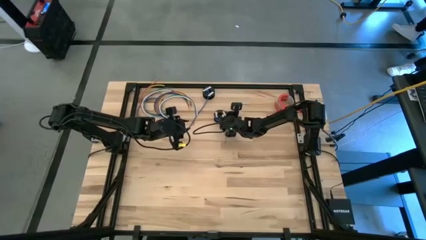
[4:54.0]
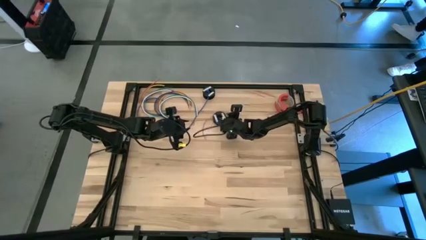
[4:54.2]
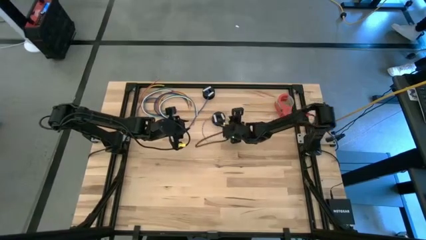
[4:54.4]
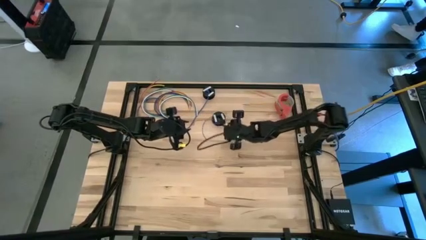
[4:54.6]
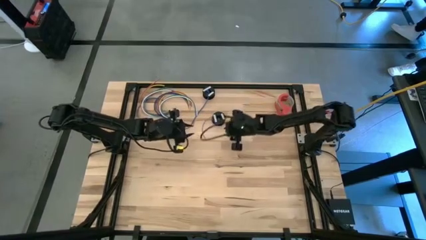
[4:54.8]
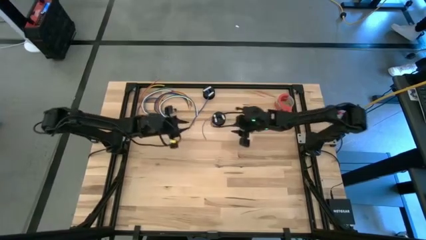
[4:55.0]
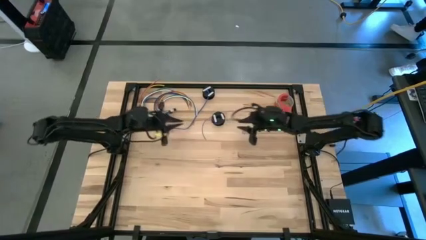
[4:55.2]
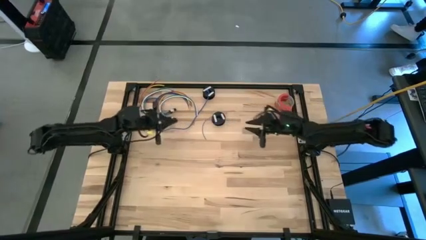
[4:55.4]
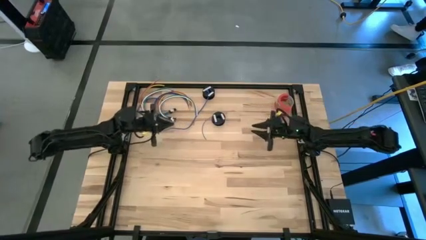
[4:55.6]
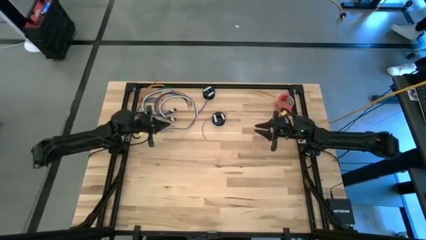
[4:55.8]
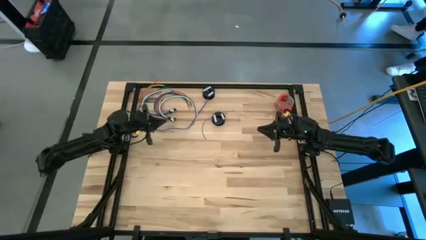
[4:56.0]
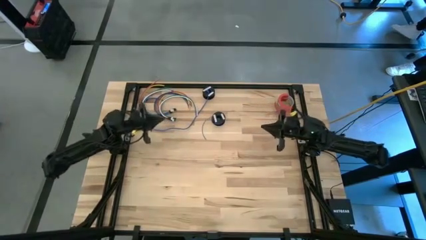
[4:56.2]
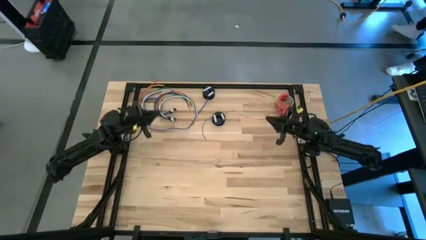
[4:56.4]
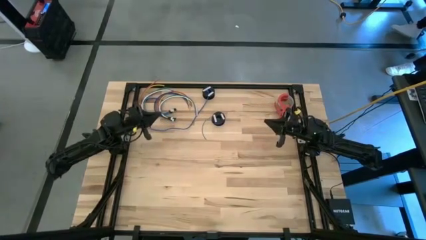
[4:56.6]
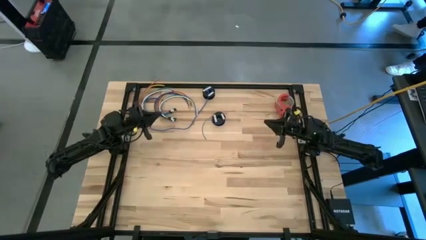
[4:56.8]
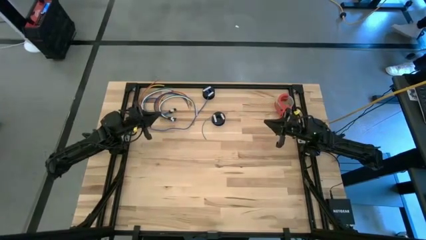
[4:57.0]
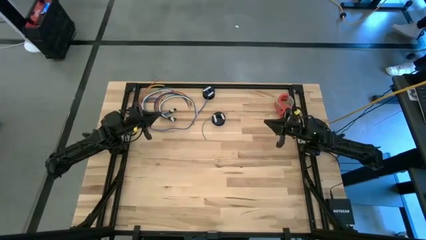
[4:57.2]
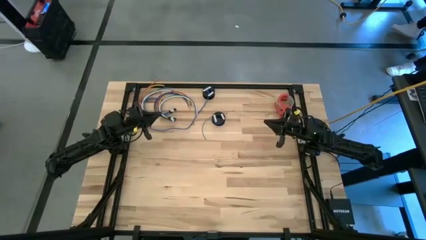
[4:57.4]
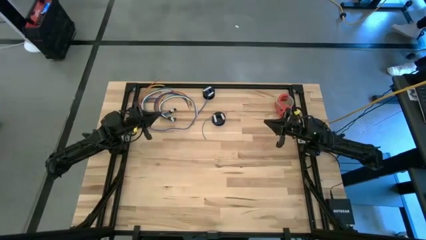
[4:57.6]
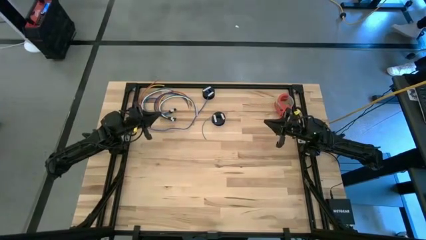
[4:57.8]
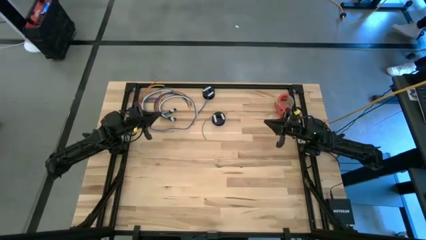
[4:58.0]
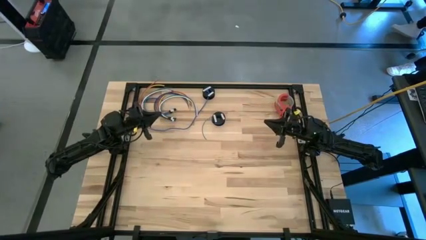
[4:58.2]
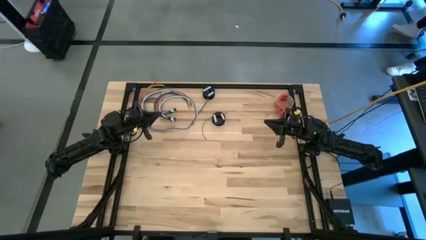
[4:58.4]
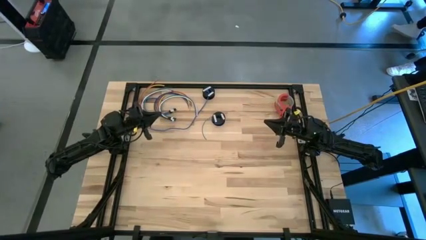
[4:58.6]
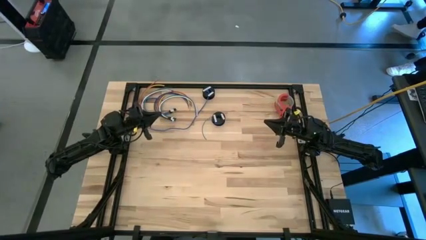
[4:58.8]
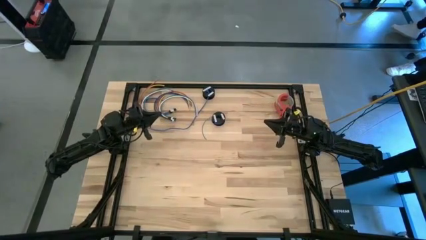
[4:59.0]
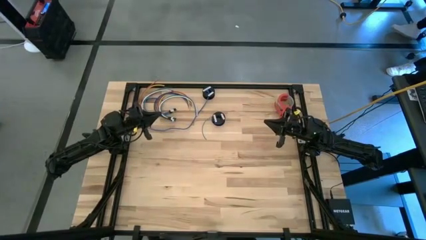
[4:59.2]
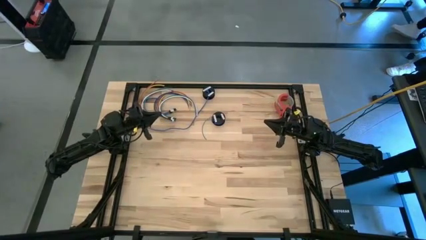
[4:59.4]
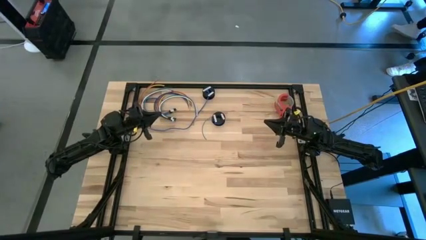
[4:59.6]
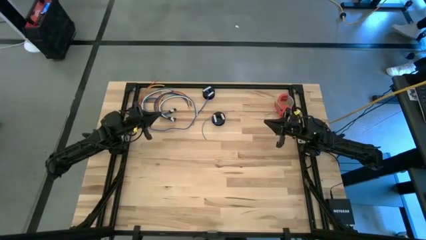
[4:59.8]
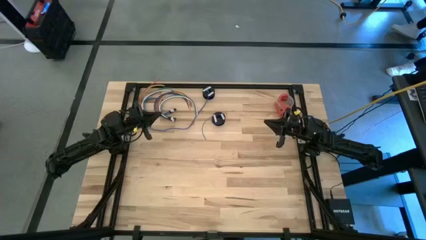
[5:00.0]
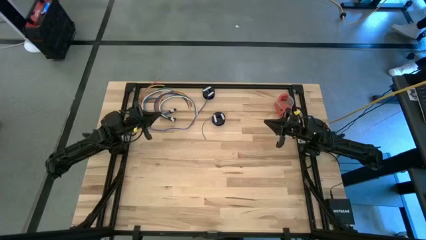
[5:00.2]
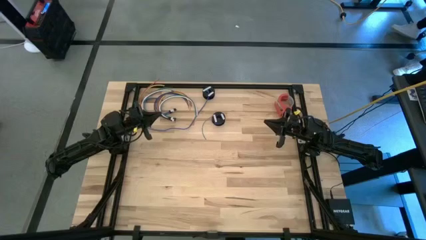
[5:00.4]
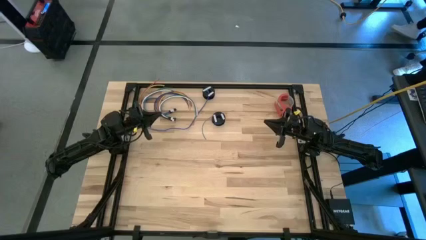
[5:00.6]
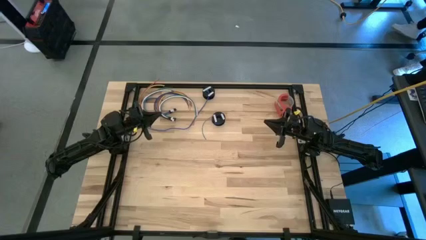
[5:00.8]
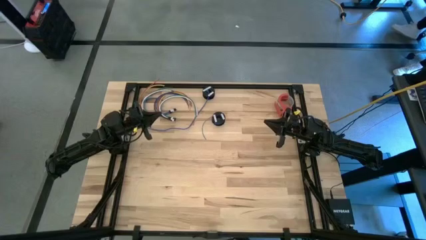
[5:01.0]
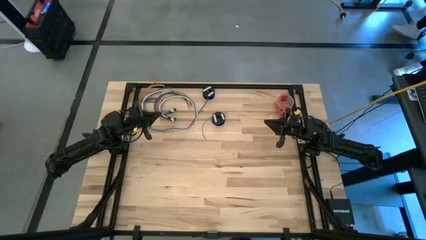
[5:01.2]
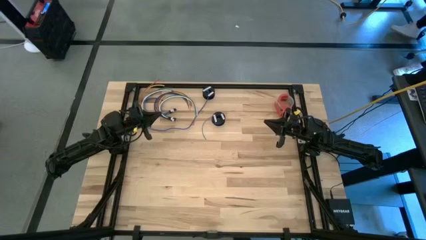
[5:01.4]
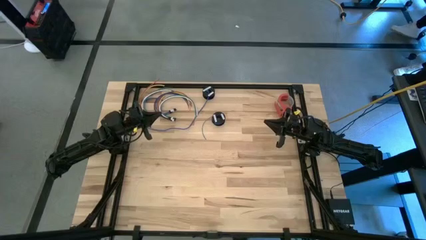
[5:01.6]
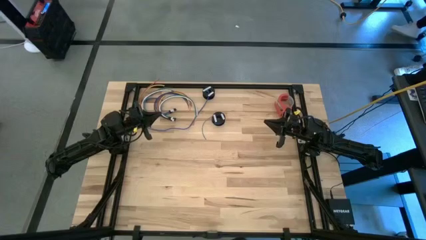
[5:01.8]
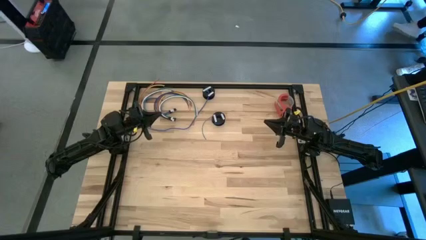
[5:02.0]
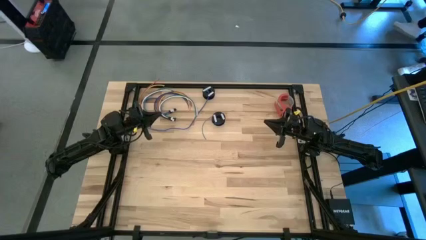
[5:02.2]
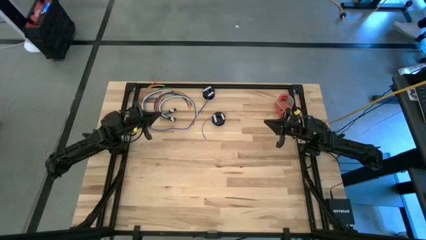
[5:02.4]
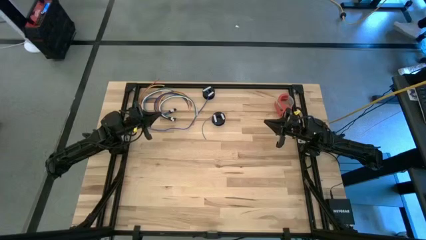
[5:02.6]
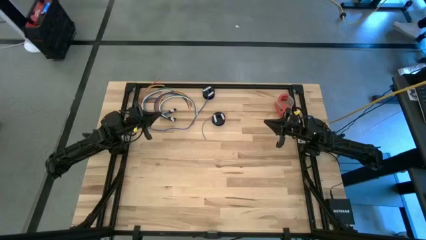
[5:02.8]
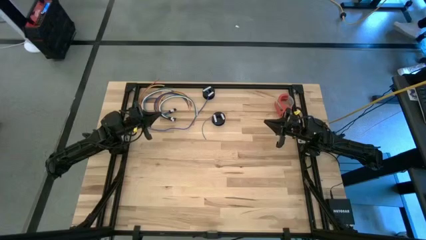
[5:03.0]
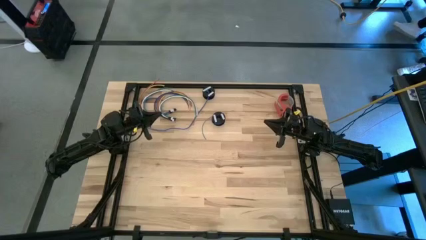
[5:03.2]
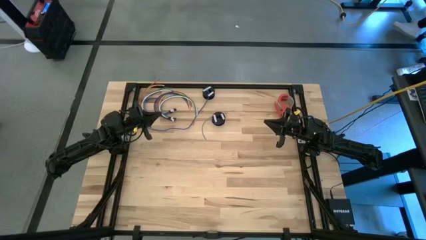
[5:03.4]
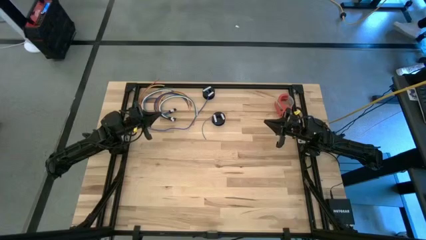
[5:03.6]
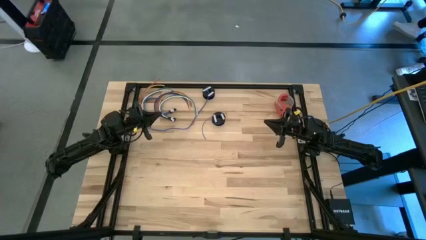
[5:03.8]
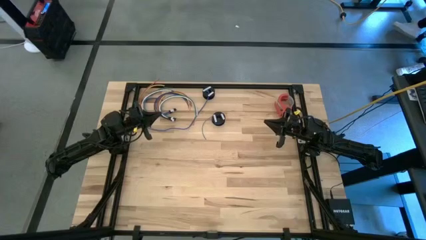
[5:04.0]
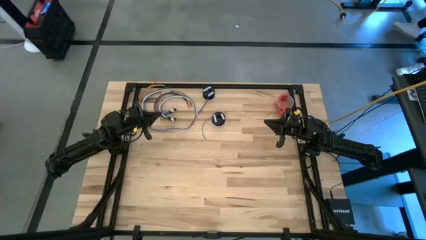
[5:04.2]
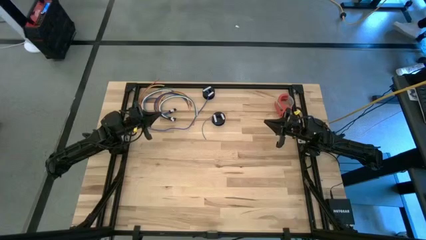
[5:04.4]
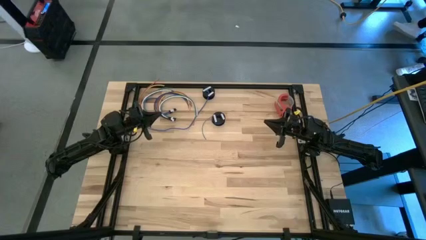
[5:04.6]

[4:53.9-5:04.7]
Task: Coil cords
Return to Home Position

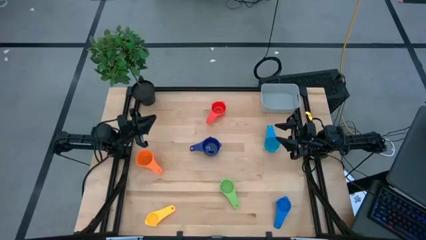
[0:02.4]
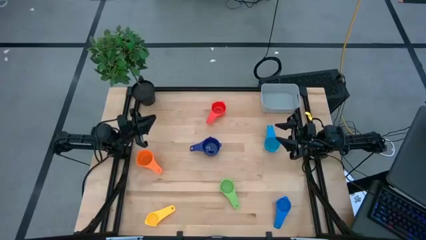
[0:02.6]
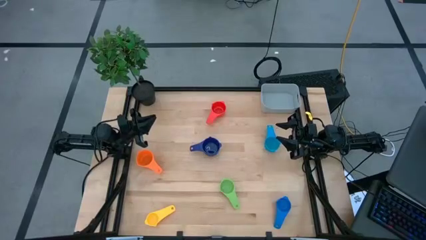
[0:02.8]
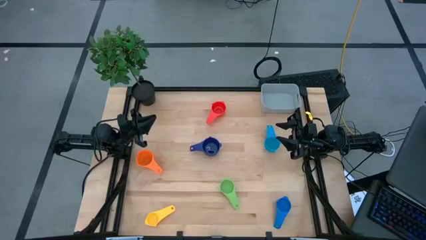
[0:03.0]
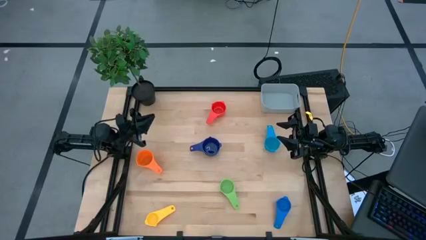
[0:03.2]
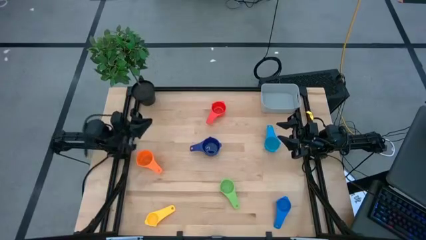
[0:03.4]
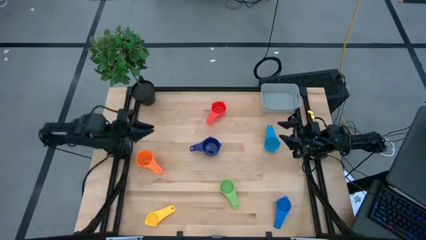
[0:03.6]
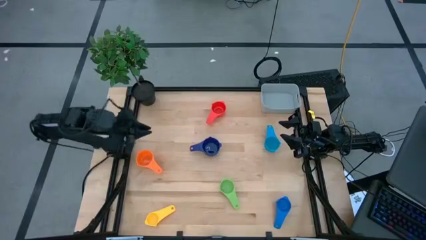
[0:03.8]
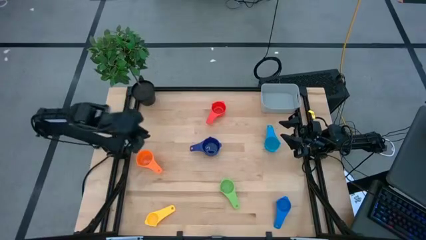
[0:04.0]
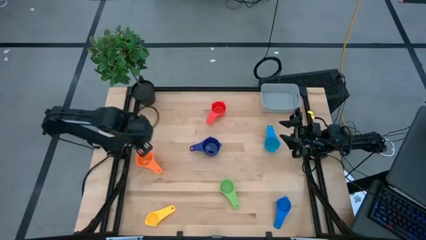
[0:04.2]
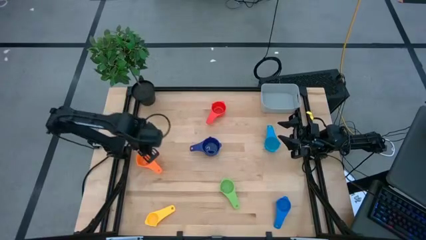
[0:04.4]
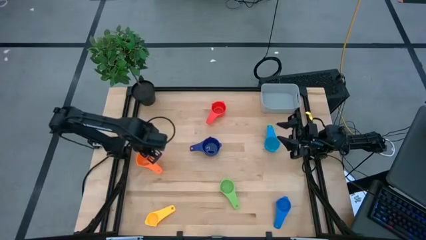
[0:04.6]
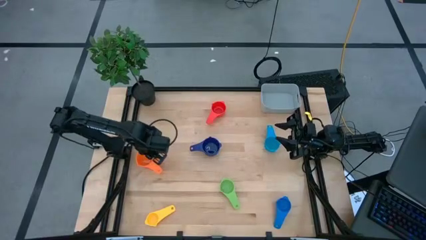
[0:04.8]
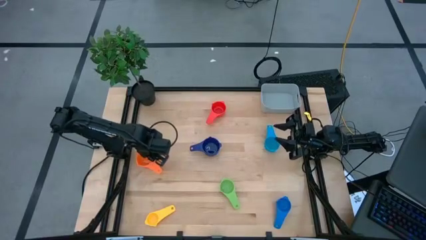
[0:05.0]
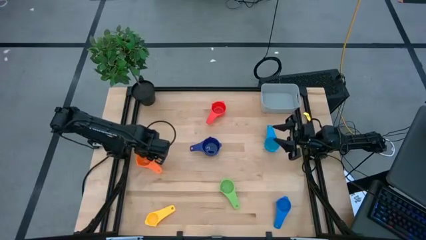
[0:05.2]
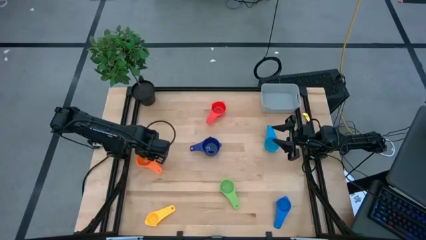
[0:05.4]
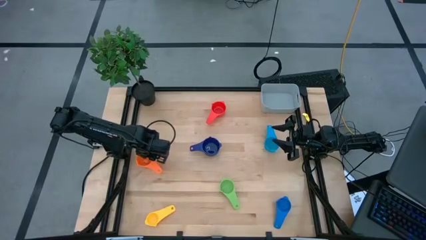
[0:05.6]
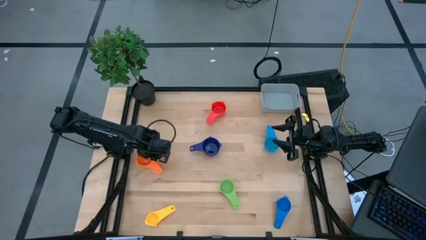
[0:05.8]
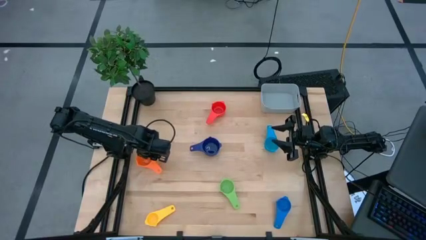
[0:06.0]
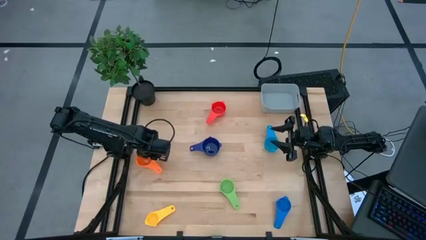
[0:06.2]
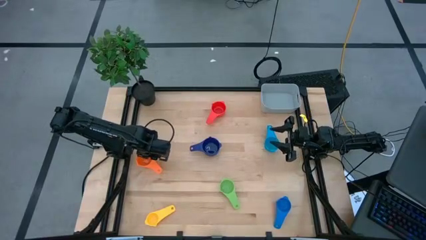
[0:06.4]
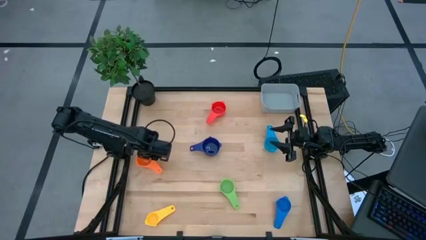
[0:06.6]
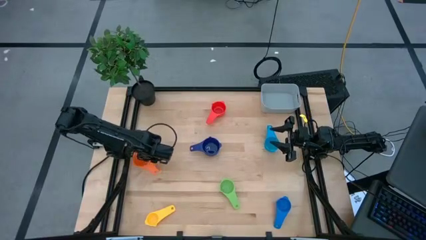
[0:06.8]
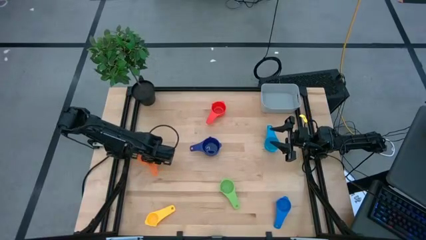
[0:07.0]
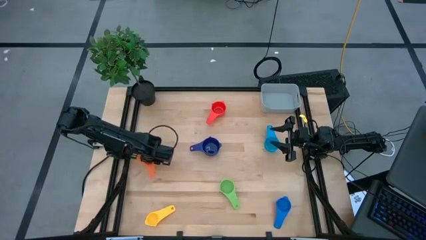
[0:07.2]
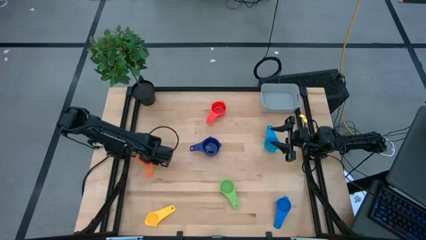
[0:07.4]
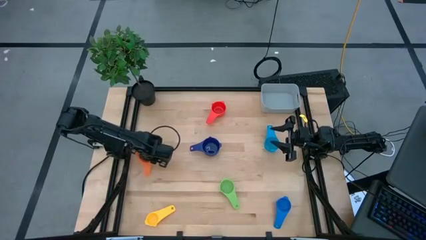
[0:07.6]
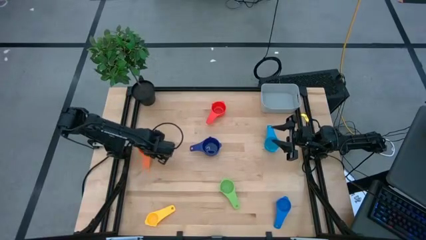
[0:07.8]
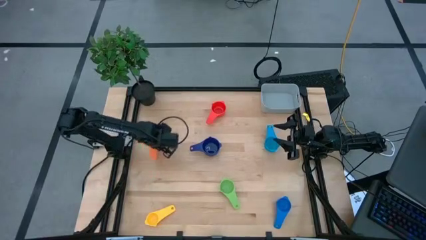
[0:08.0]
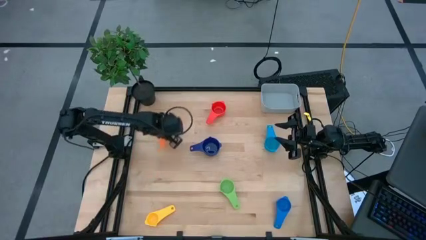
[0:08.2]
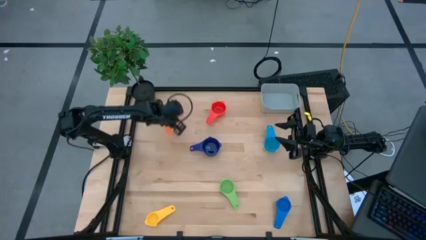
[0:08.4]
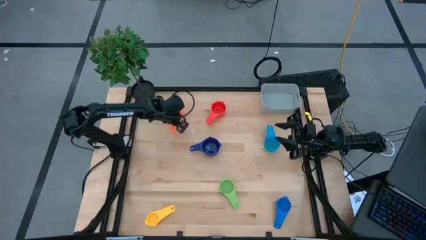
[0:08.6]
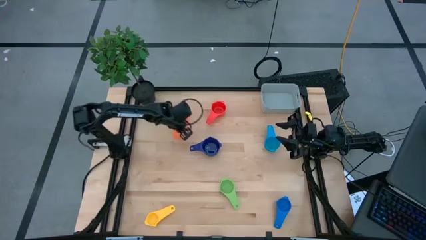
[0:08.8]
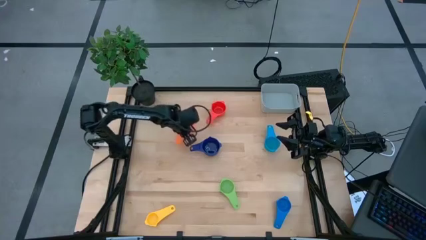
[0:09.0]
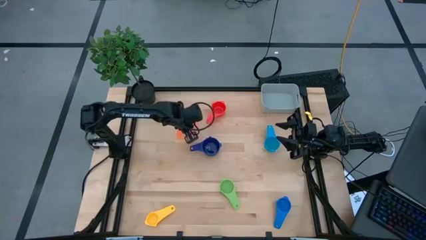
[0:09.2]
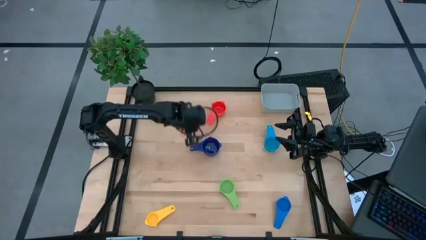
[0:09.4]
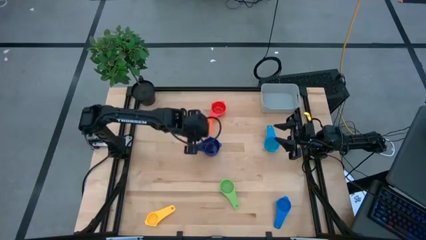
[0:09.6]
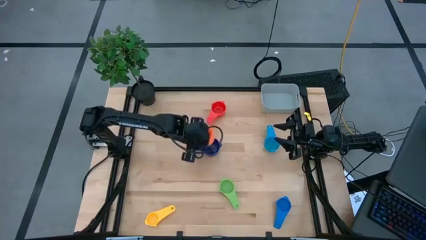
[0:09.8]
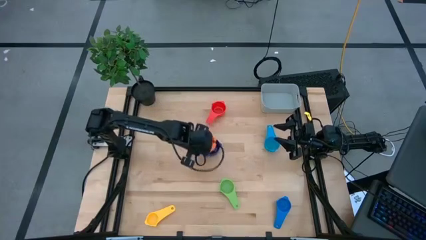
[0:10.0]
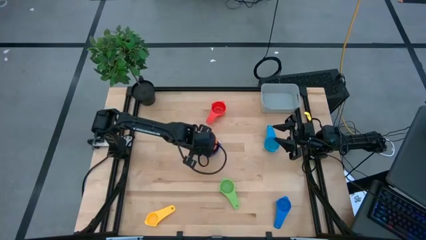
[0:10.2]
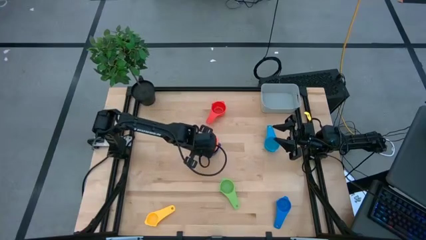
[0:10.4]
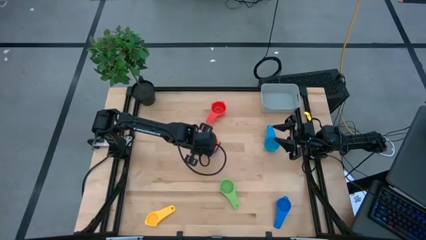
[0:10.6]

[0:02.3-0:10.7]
Task: Nest measuring cups in basket
Stack the orange measuring cup on top of the dark blue measuring cup
